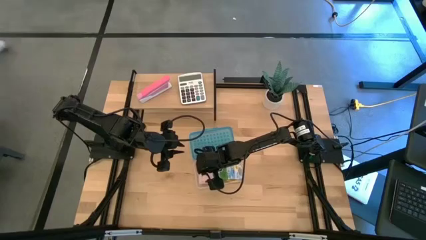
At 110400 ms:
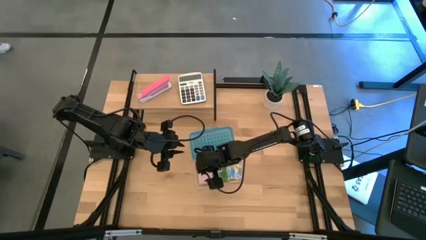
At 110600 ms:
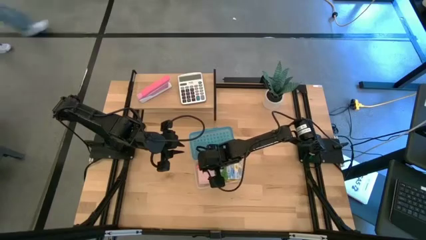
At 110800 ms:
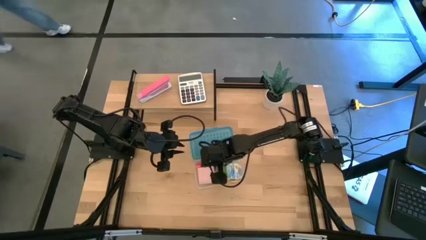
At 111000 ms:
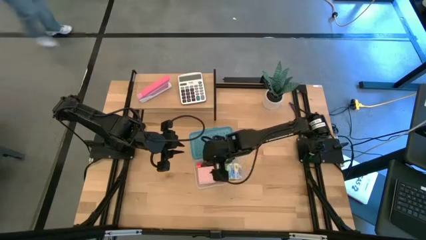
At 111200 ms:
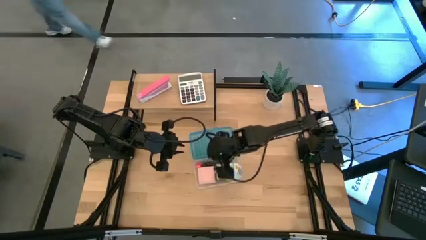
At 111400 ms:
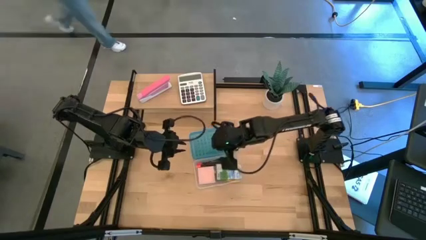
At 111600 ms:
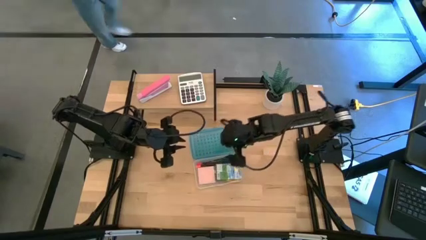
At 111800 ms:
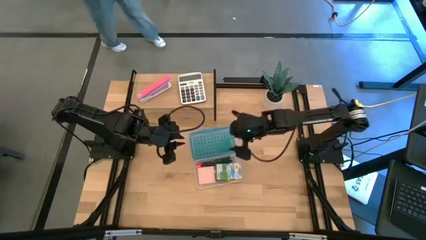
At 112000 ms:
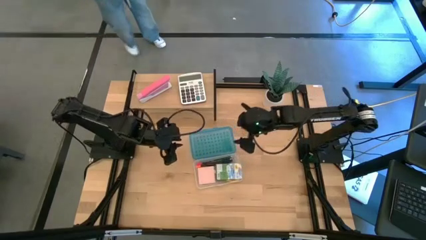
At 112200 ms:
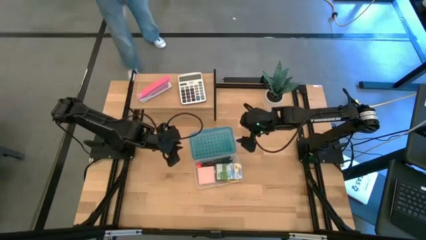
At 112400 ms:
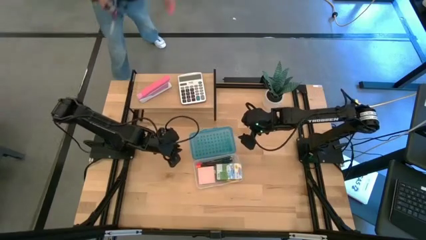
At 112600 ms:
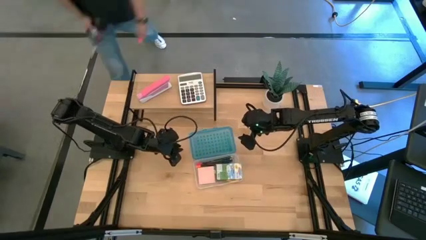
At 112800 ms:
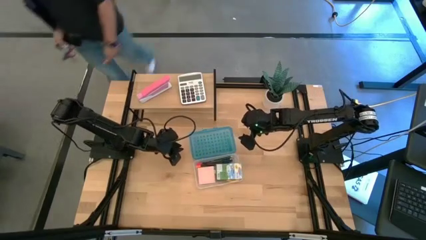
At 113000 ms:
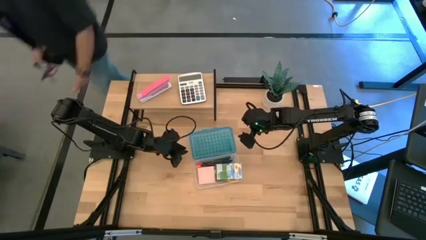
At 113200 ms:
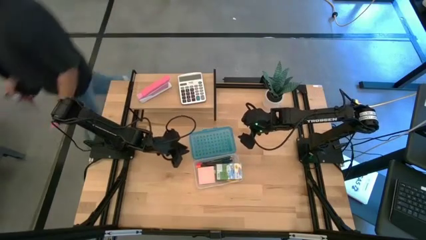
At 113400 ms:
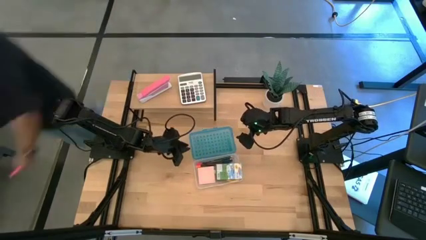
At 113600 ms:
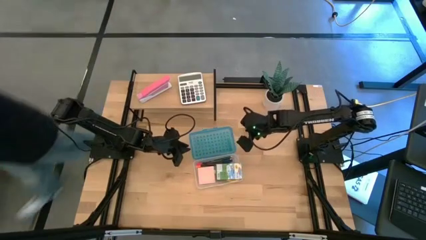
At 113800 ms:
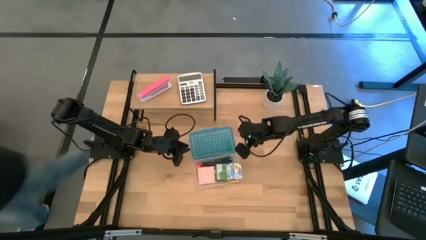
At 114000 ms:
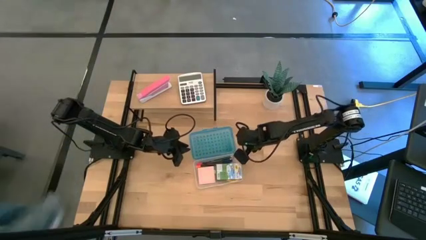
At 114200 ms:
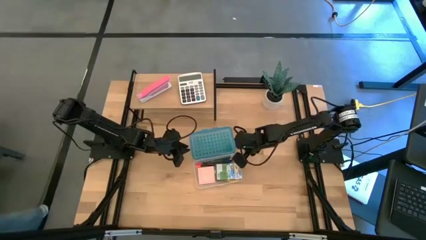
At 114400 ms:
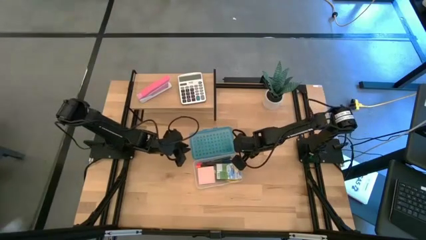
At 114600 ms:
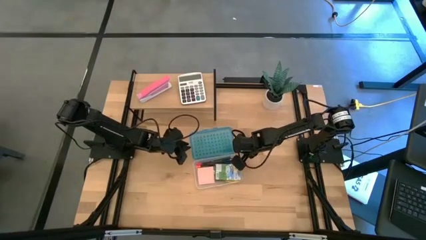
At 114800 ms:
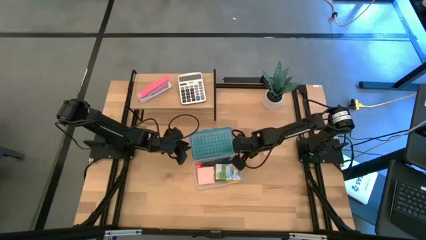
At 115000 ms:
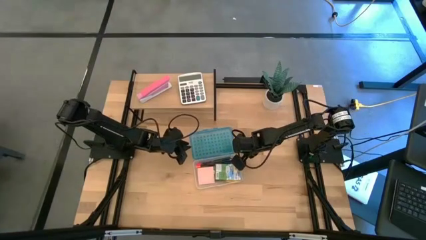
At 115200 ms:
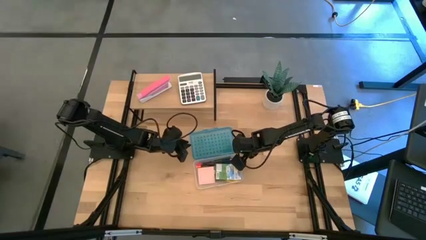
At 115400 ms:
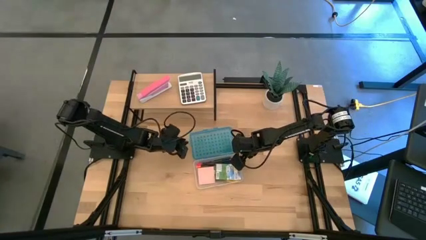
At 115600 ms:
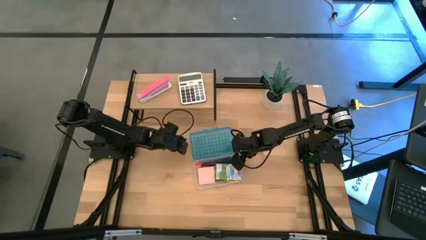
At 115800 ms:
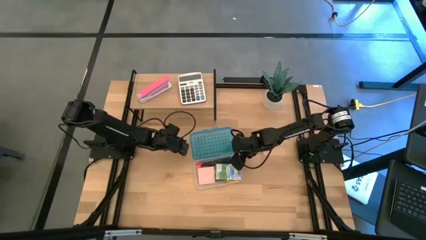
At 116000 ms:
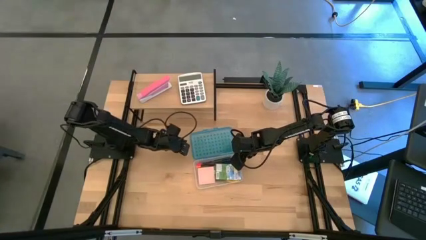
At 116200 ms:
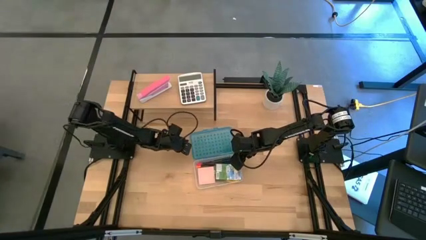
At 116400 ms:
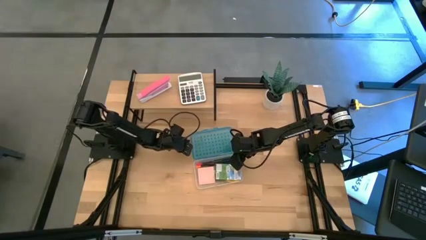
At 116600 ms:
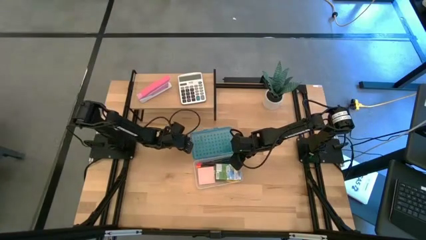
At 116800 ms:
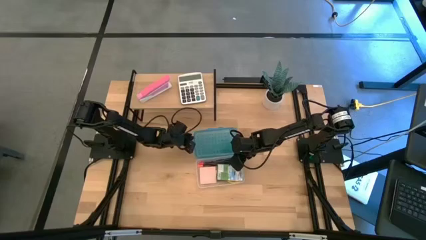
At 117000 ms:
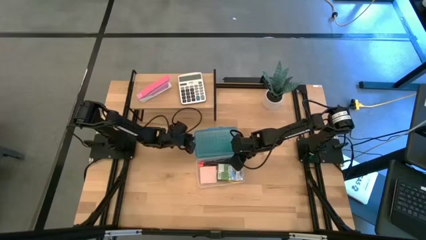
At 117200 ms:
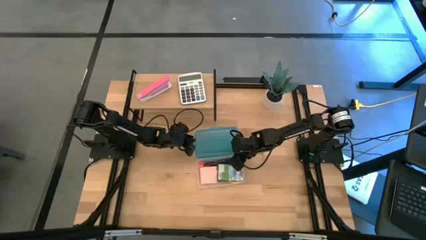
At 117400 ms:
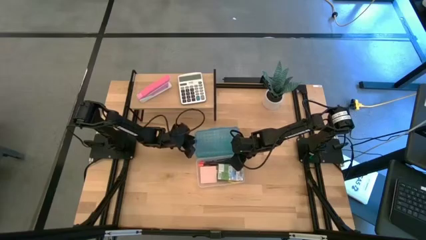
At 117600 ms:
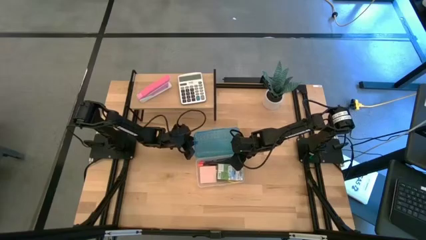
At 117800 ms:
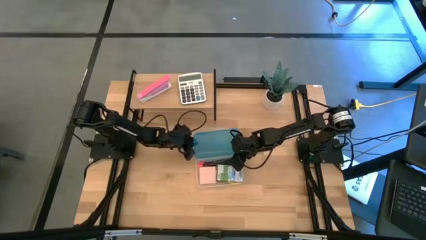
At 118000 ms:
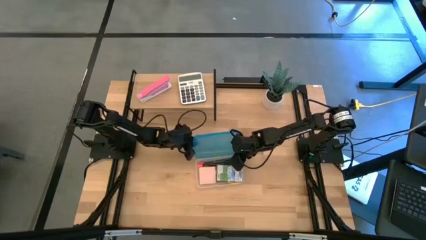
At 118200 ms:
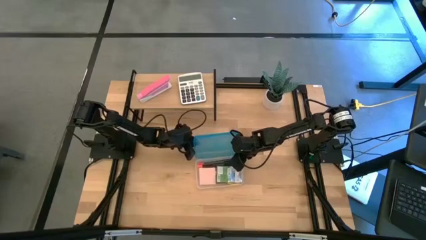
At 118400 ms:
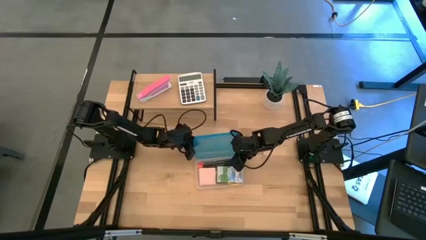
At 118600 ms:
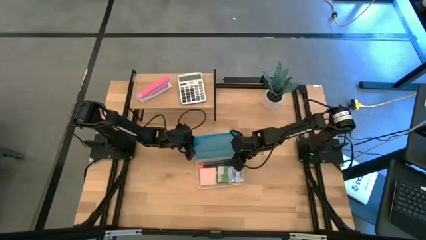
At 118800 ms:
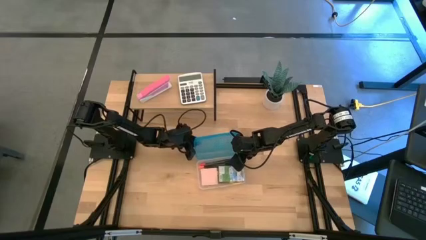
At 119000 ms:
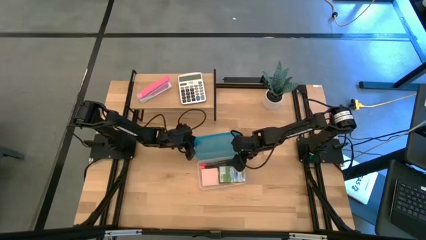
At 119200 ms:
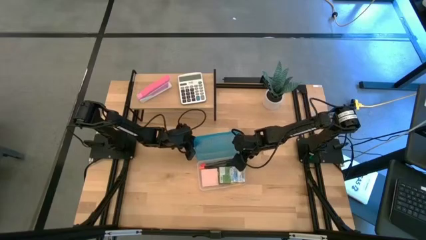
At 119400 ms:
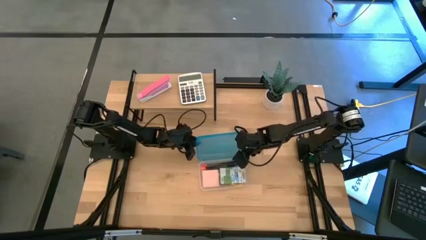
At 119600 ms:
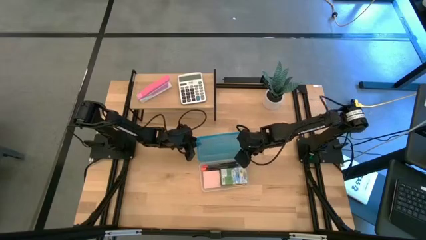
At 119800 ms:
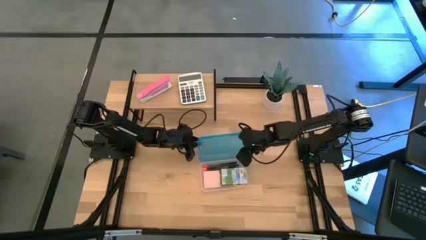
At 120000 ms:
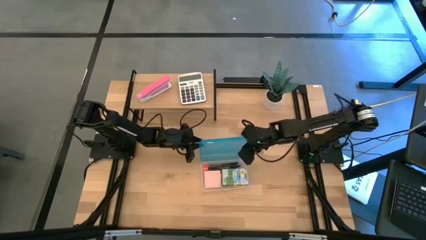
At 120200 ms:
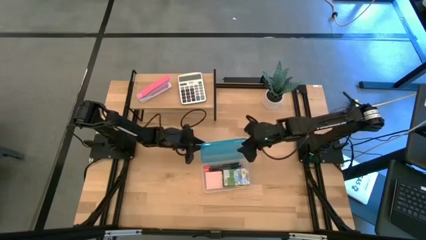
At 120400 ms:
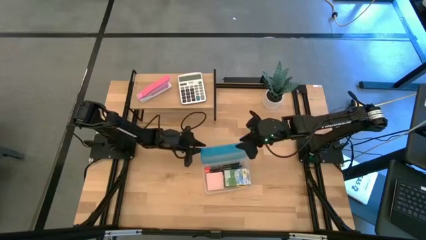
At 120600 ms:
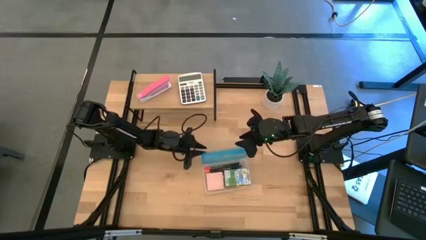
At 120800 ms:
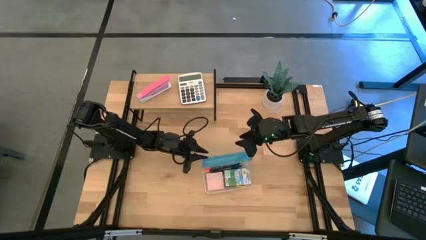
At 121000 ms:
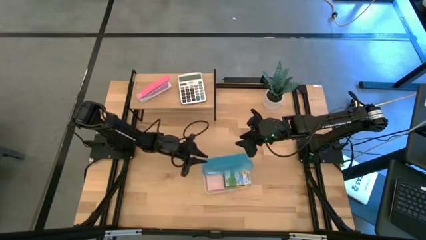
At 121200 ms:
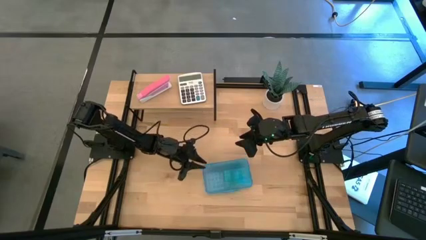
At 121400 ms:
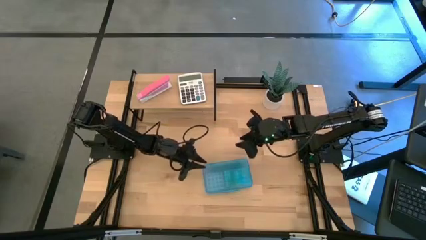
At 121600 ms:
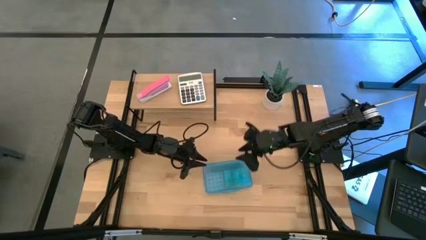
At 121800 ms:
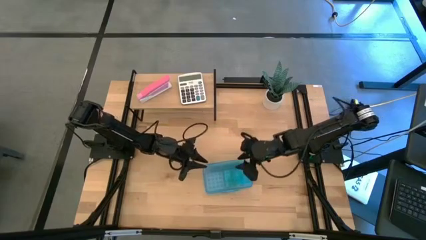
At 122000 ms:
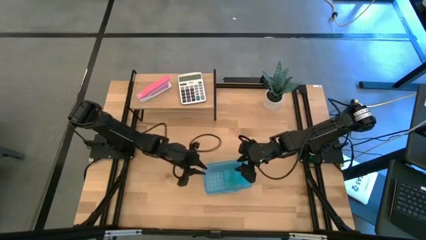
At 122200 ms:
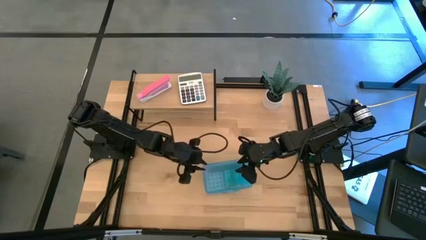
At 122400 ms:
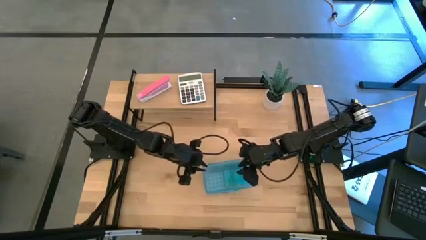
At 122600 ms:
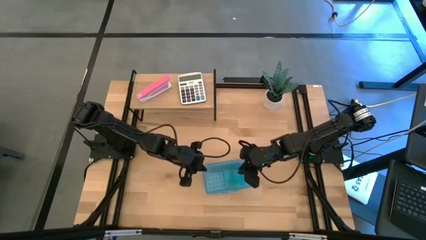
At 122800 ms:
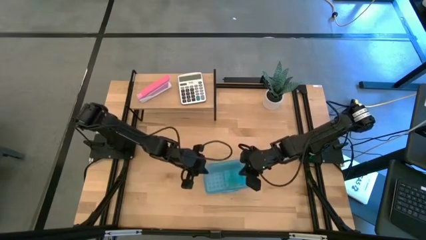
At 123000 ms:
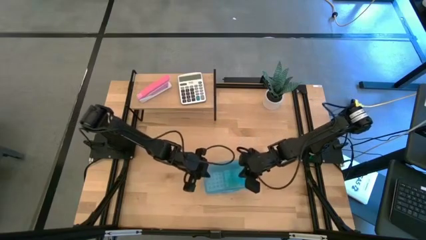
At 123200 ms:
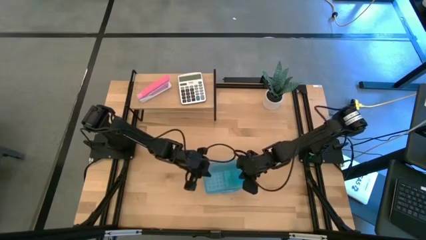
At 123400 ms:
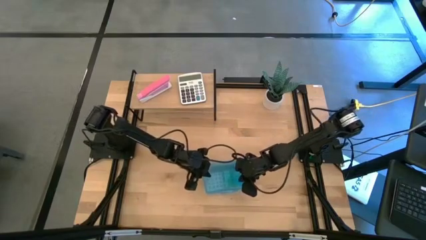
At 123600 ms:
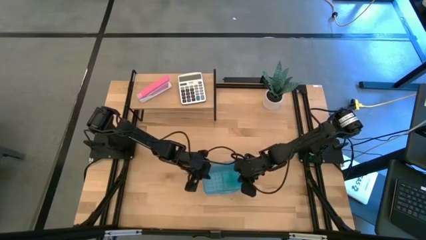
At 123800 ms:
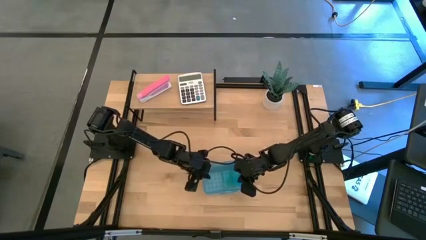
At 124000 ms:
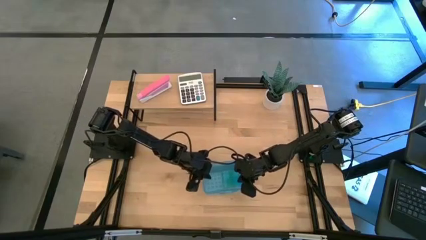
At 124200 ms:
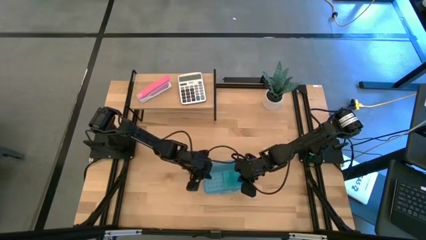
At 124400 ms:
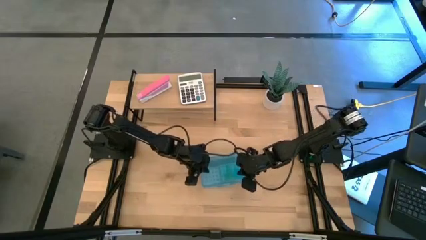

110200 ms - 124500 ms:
Task: Pack school essentials
Close the blue supply box
